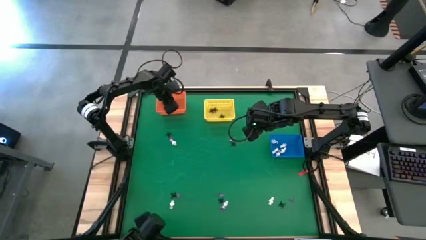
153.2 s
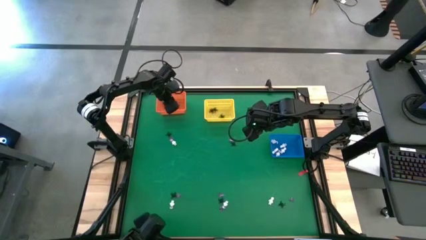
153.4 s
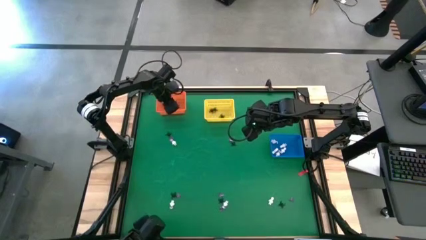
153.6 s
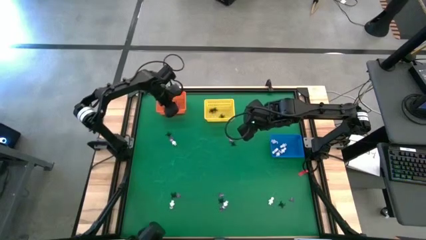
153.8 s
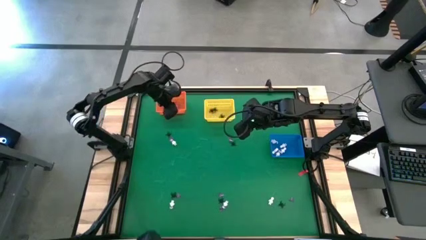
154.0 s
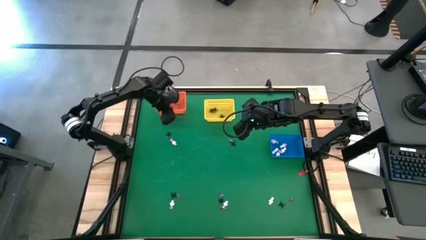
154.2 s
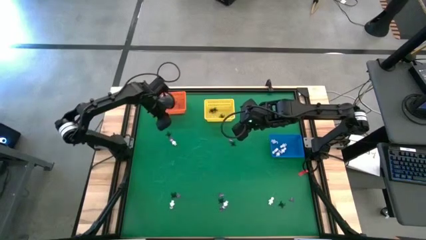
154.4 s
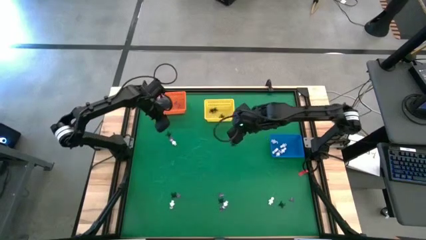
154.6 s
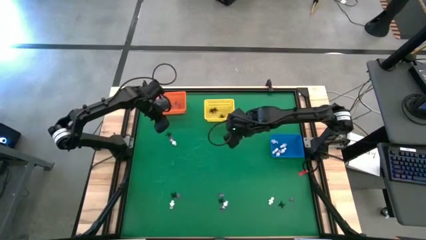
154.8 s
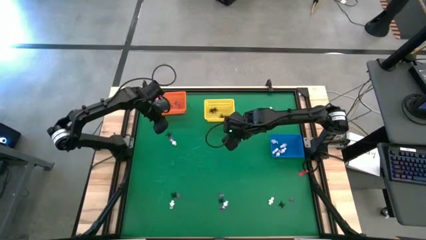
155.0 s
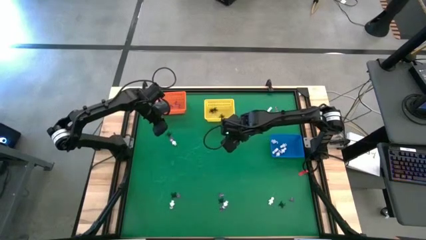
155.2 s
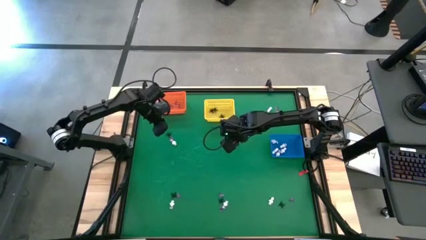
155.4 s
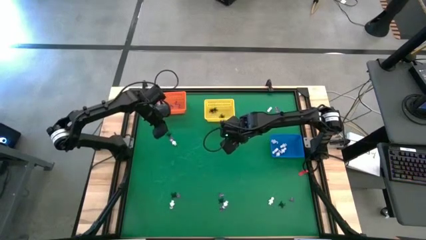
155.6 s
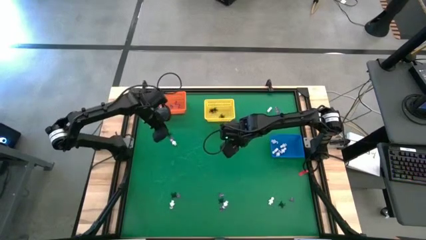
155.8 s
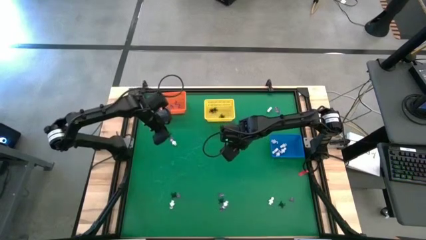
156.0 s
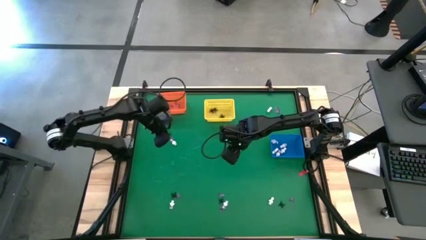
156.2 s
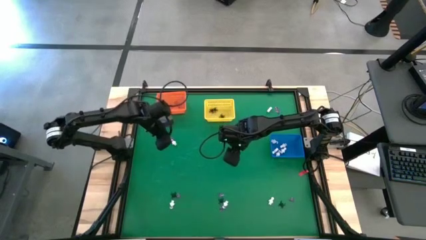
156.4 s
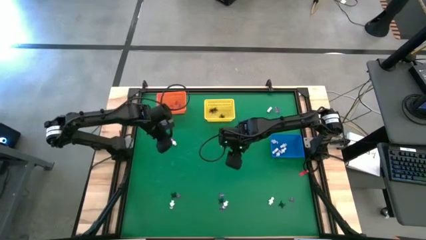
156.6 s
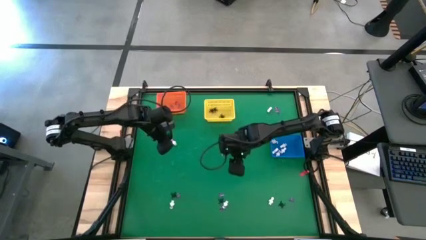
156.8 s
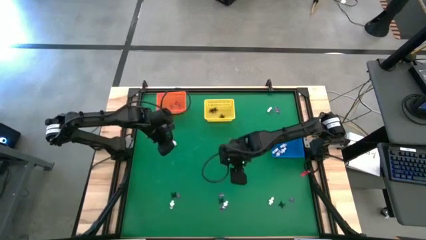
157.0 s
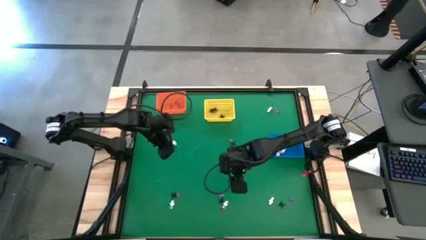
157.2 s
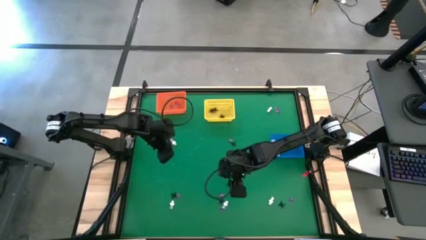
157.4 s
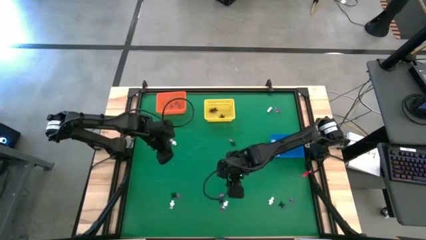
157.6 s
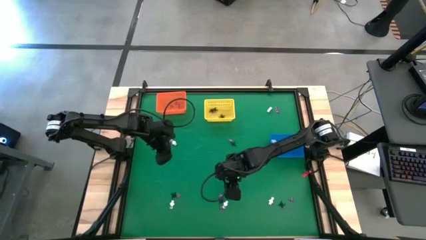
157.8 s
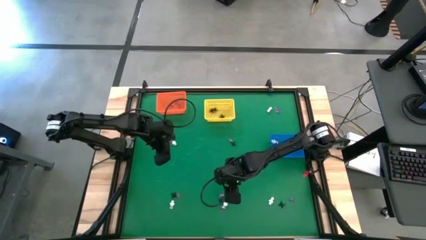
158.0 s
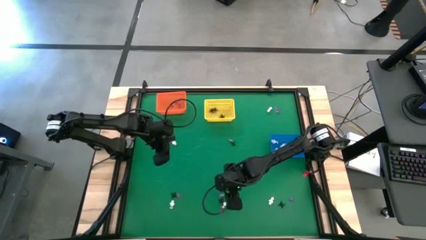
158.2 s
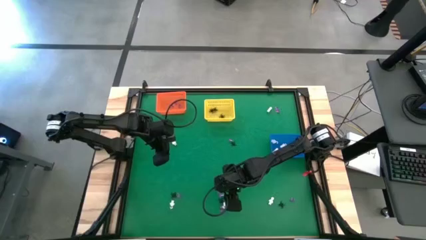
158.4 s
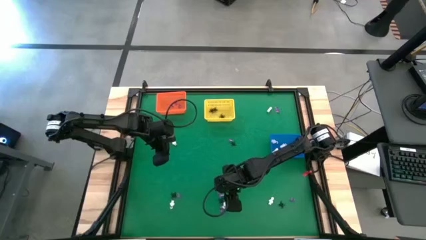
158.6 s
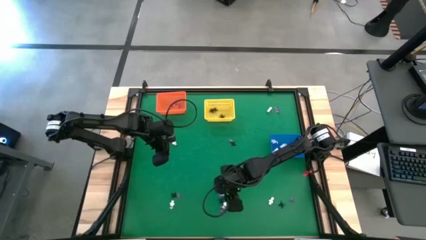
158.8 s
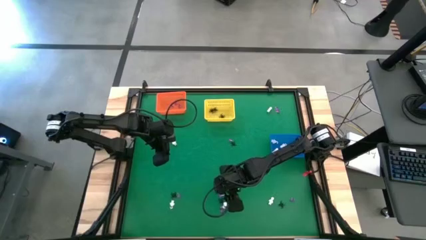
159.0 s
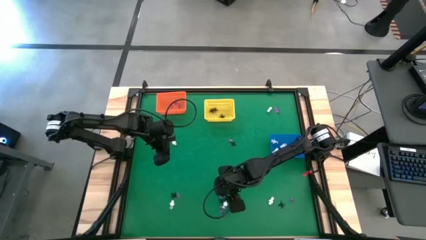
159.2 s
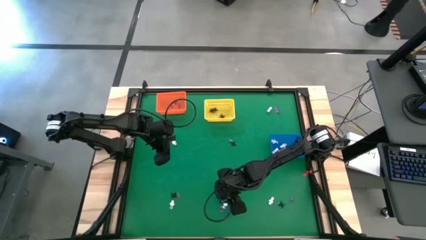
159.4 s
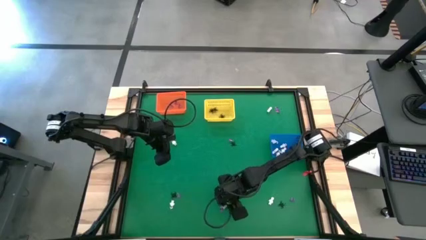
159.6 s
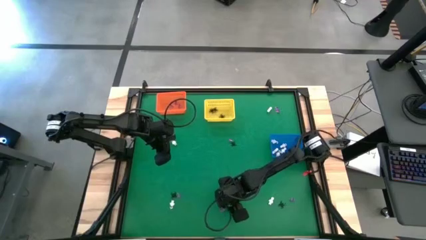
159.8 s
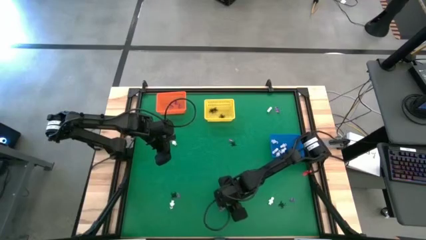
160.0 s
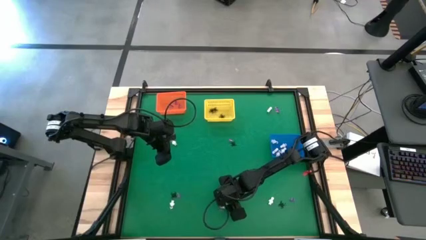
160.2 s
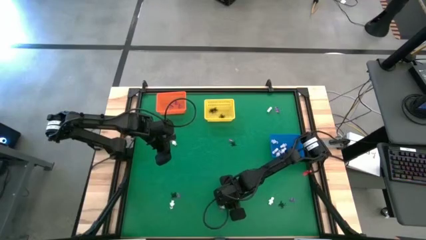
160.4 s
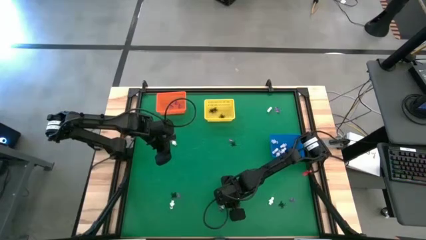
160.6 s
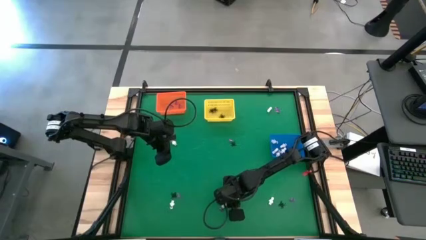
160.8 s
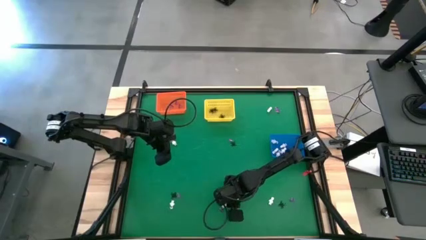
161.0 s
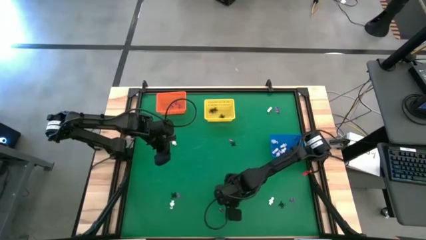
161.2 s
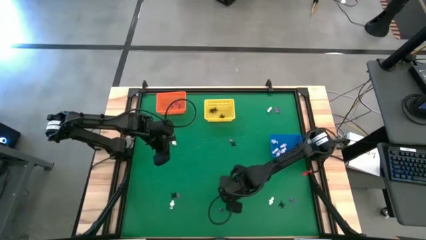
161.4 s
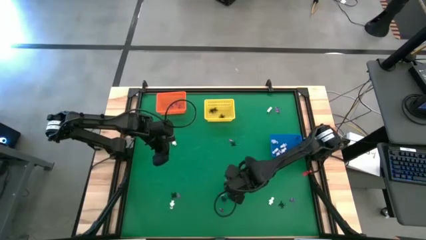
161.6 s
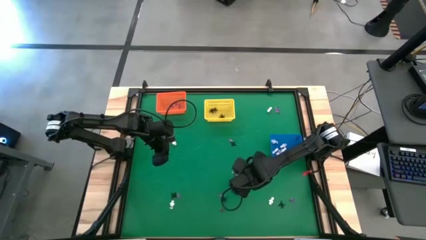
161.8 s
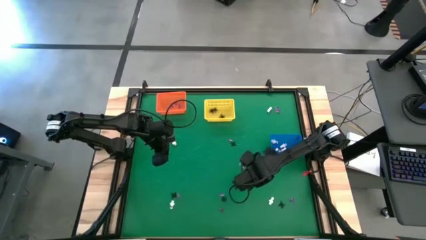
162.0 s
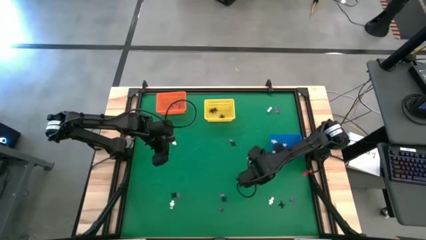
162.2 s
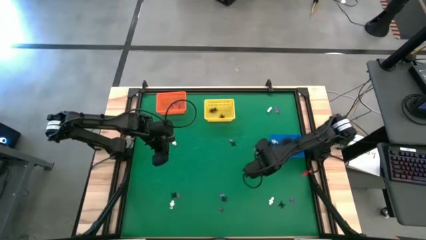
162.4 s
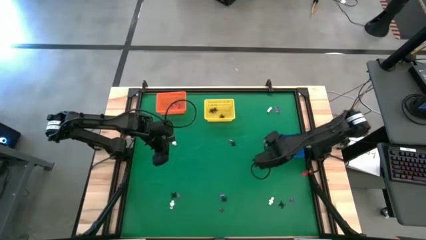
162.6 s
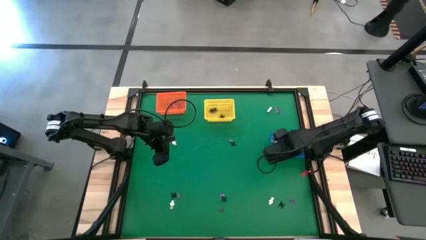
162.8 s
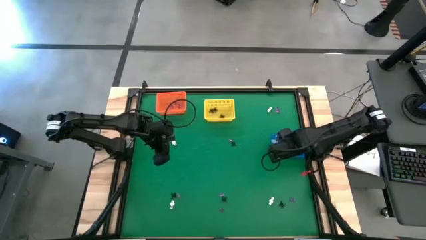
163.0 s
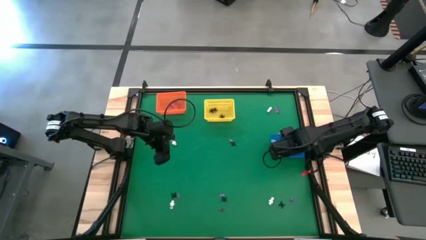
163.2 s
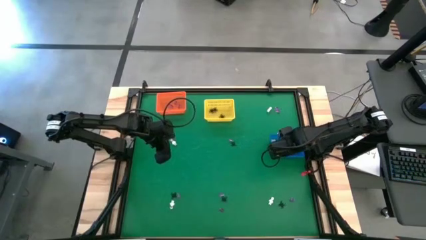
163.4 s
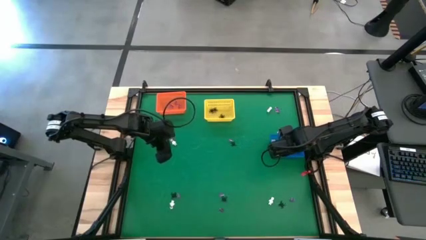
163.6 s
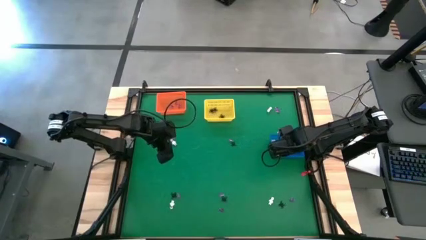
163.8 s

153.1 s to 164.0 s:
Task: Sort Halloween decoration
Put the white skeleton toy into the blue basket

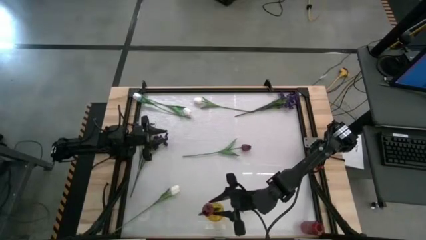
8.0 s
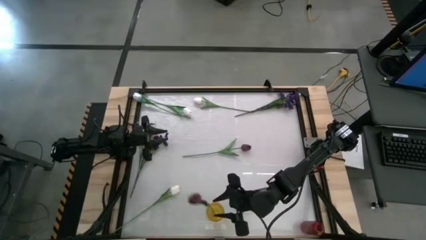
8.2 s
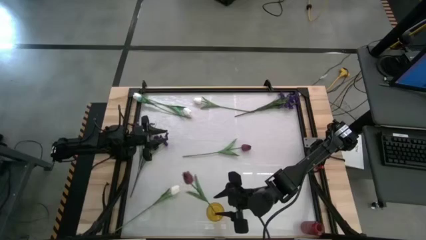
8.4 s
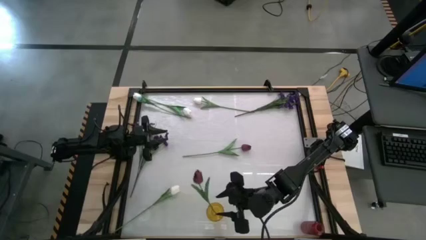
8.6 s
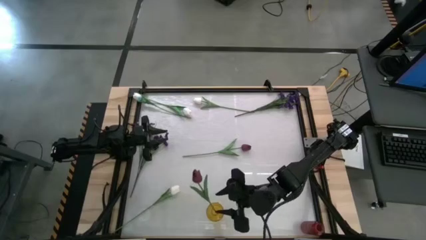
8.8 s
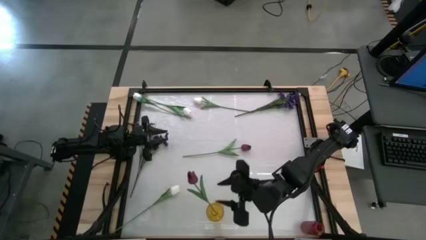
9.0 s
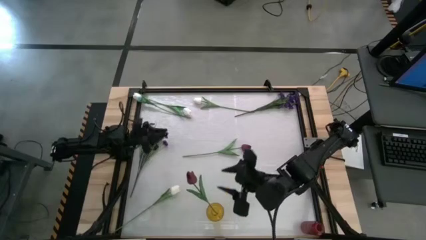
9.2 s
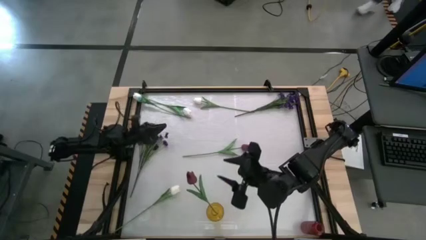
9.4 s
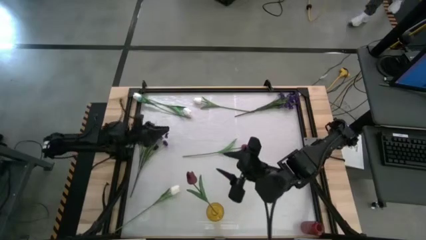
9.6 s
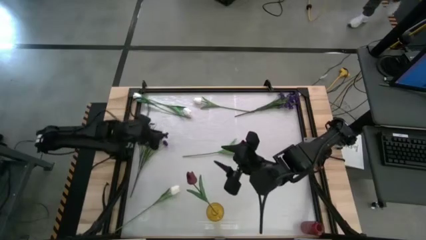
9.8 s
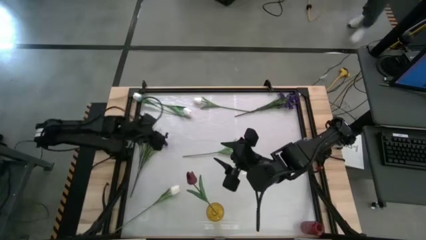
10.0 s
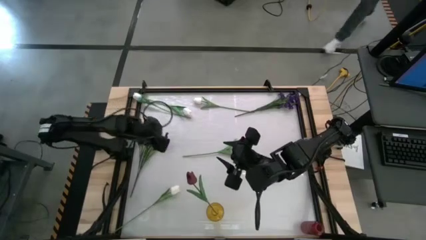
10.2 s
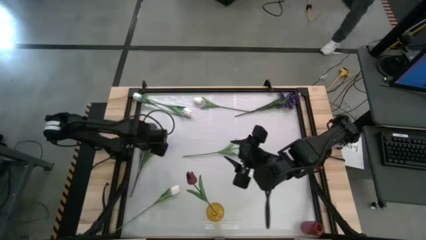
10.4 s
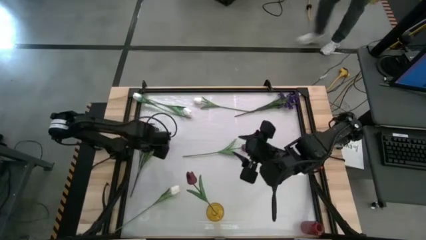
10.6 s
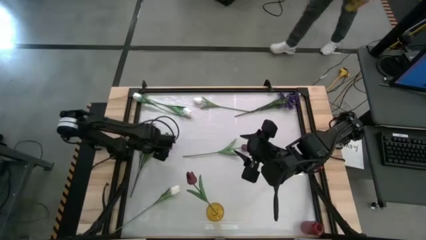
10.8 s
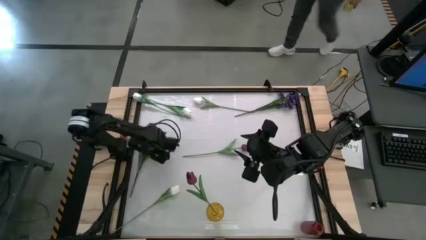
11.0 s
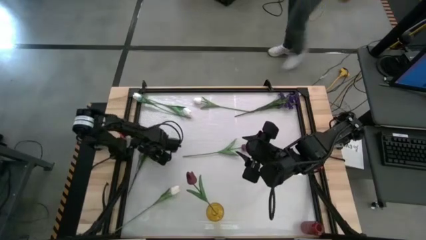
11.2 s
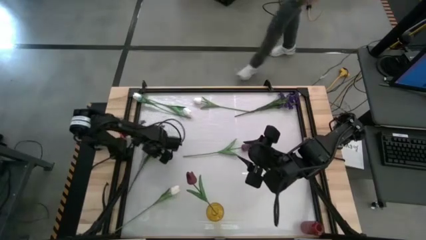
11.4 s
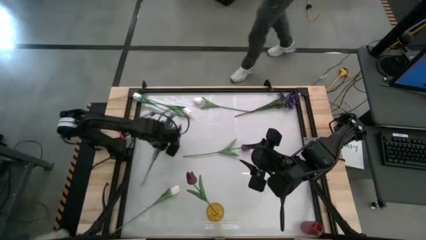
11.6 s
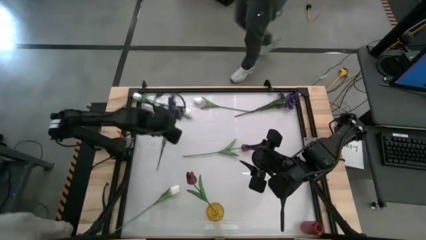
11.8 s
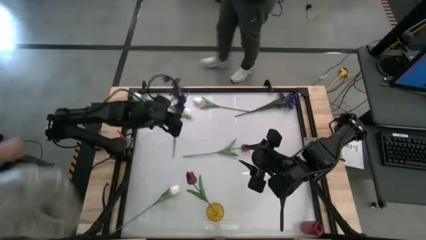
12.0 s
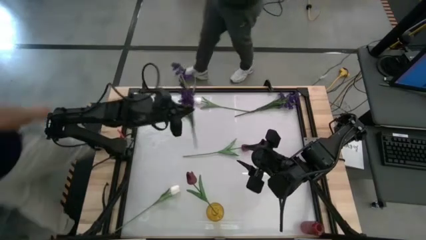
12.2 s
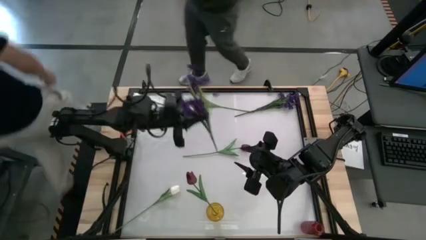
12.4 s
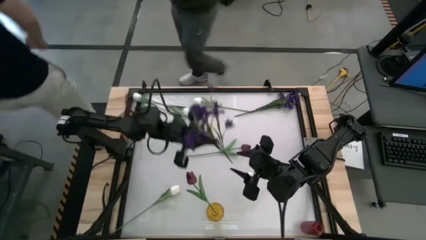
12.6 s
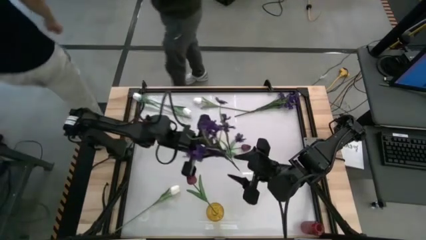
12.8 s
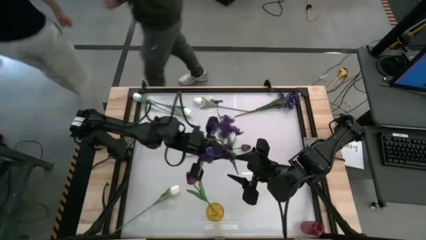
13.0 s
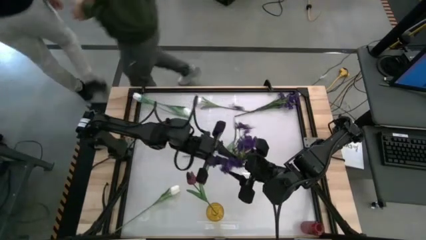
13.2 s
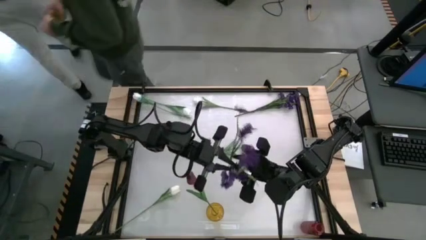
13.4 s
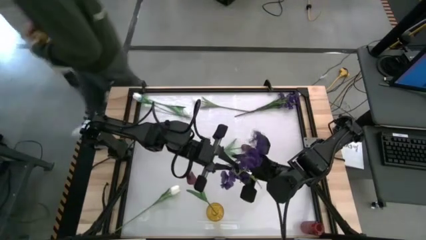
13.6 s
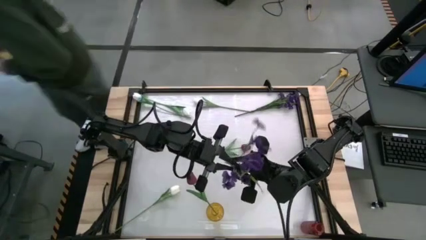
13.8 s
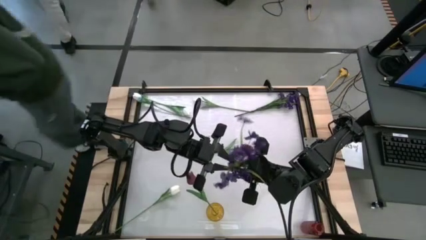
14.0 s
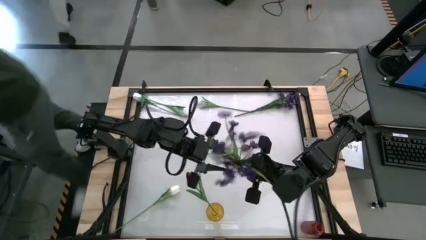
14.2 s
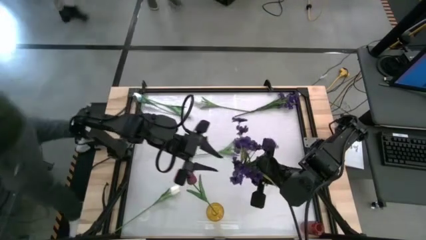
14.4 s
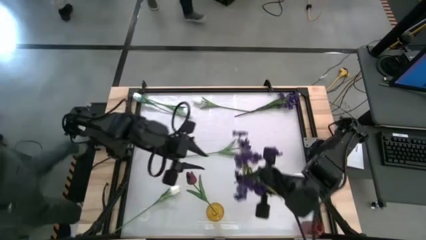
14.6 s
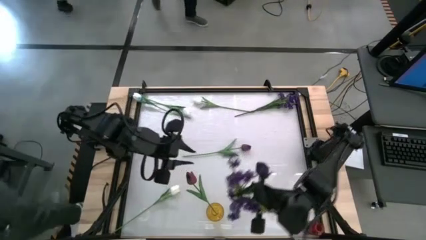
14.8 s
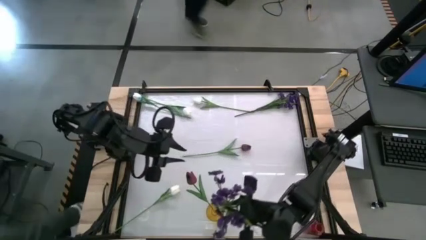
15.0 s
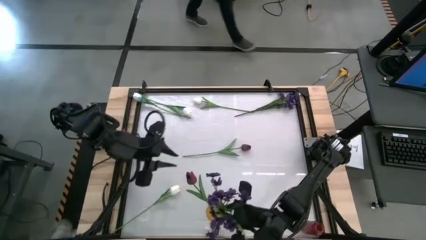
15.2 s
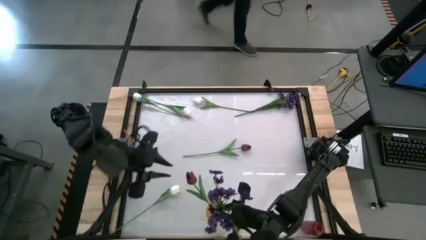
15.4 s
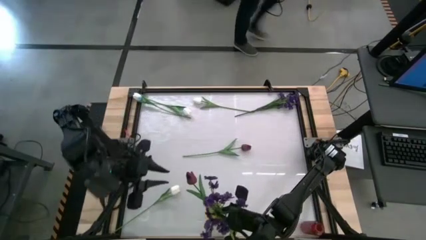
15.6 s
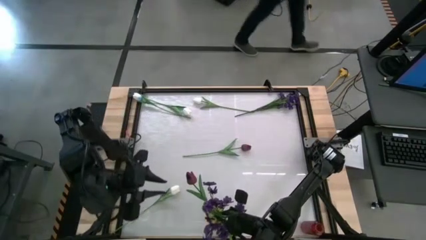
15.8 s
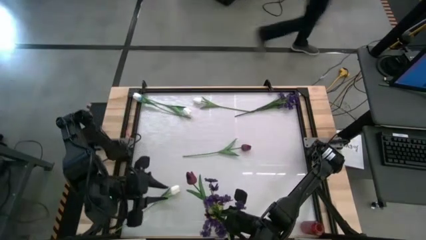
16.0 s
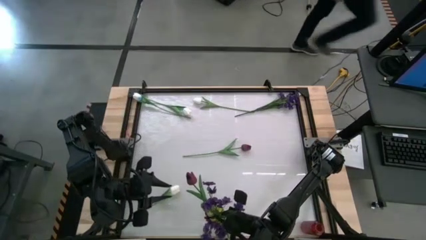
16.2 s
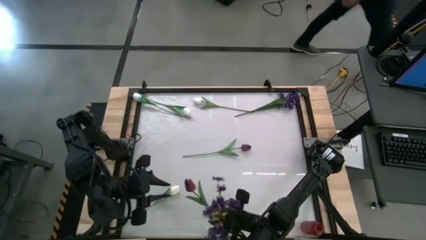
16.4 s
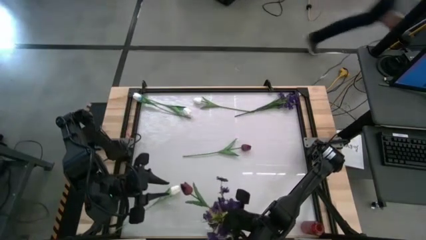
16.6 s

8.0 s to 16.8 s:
Task: Sort flowers into vase by color
Put the left violet flowers into the yellow vase
